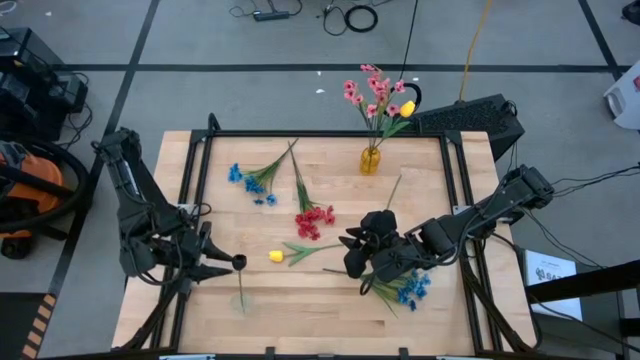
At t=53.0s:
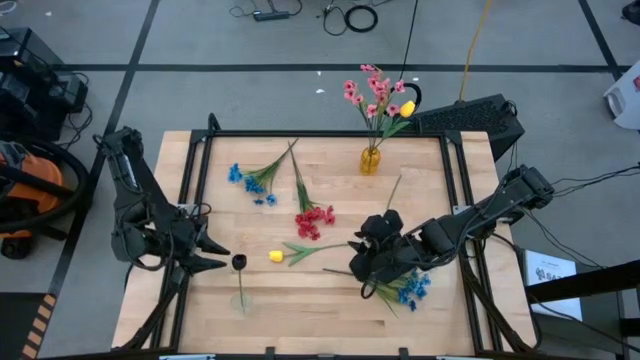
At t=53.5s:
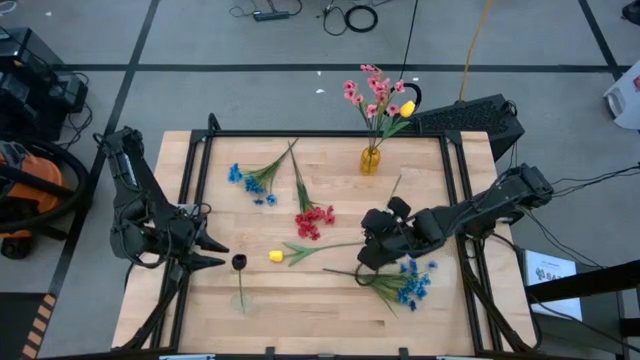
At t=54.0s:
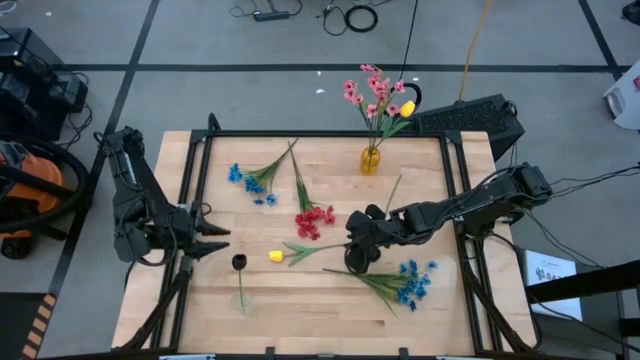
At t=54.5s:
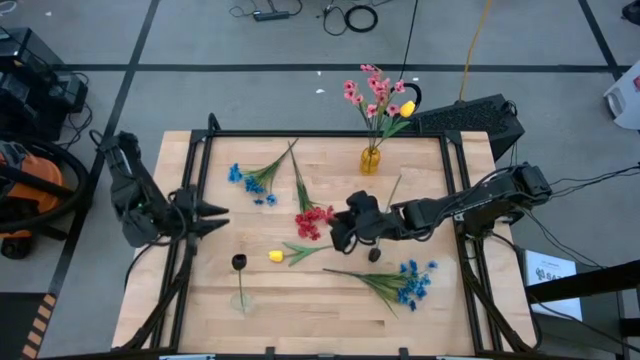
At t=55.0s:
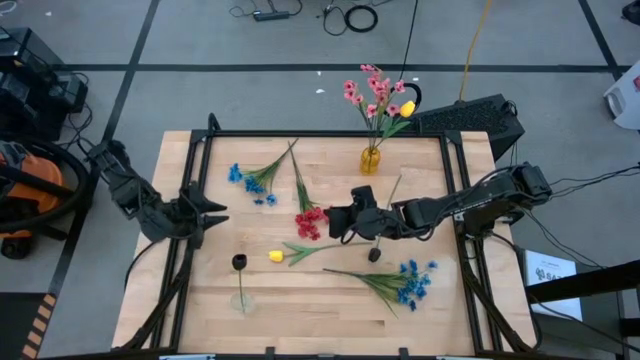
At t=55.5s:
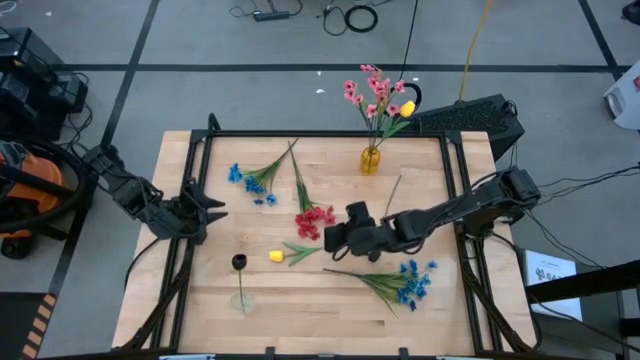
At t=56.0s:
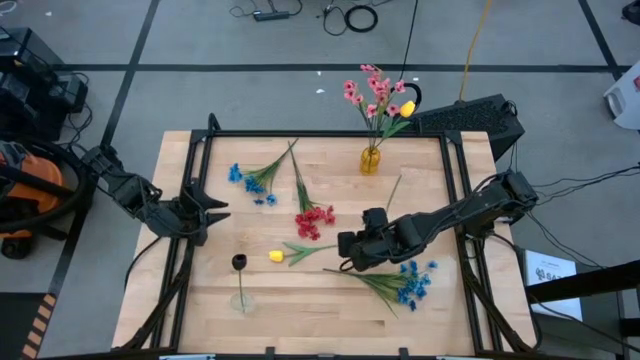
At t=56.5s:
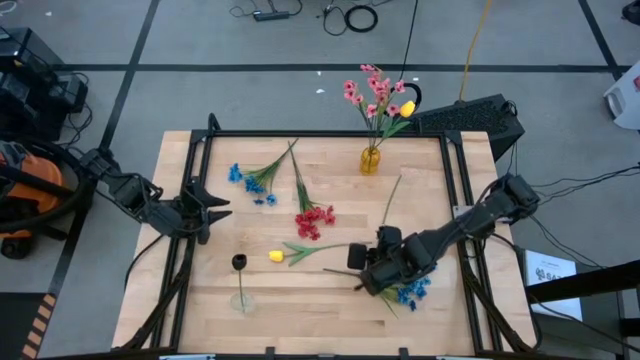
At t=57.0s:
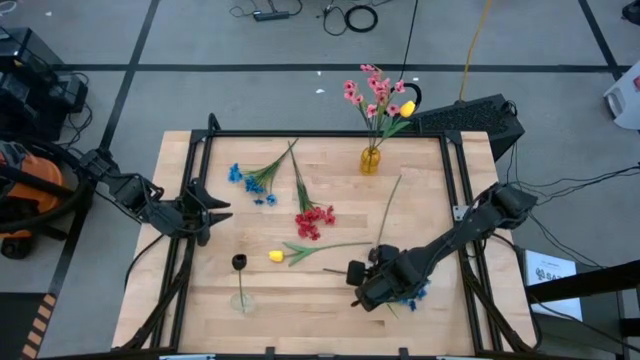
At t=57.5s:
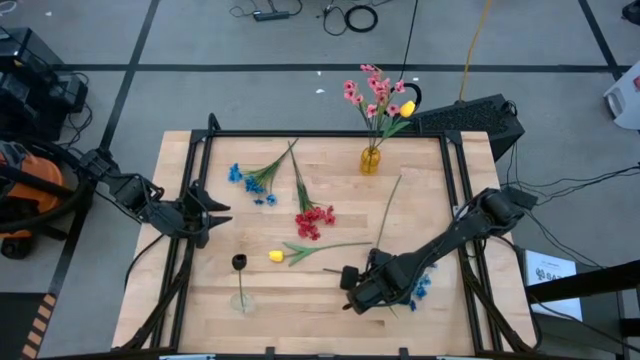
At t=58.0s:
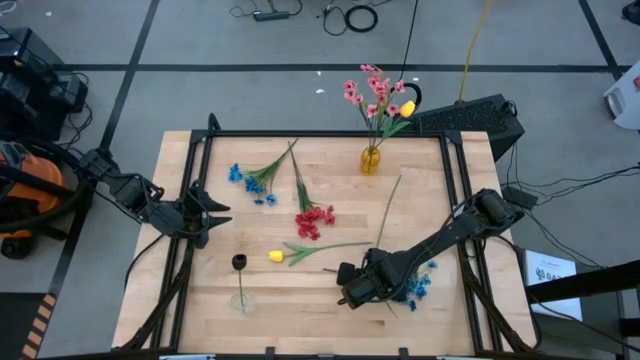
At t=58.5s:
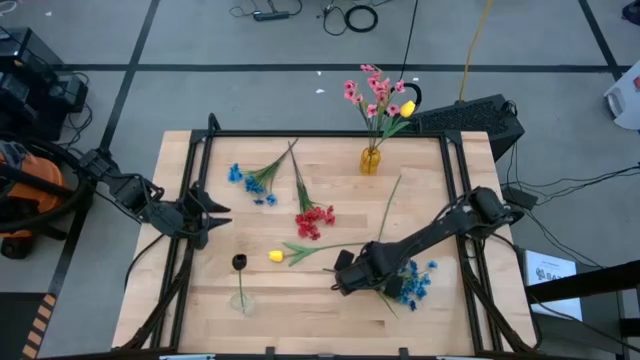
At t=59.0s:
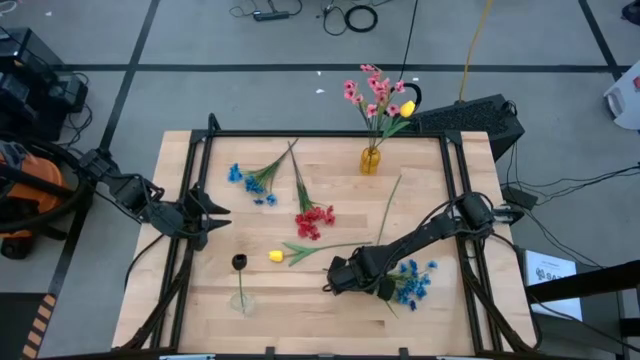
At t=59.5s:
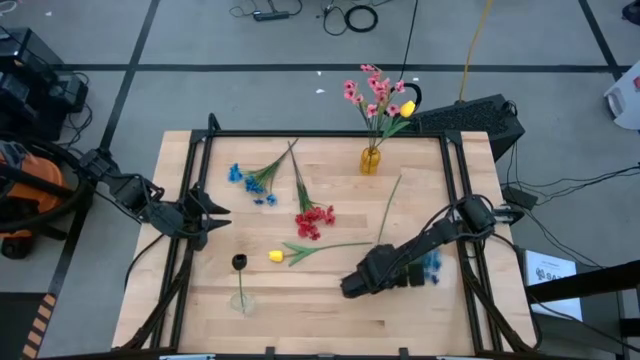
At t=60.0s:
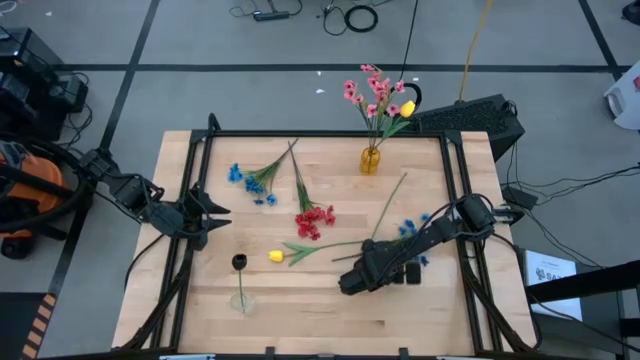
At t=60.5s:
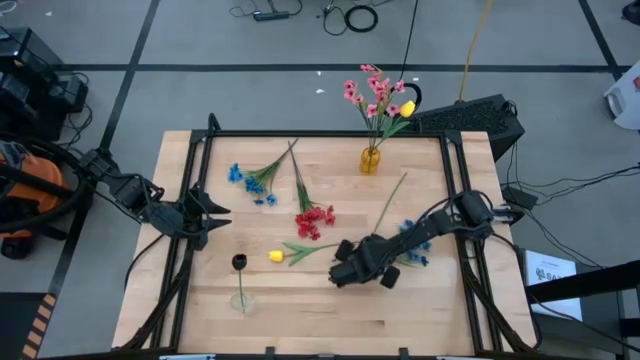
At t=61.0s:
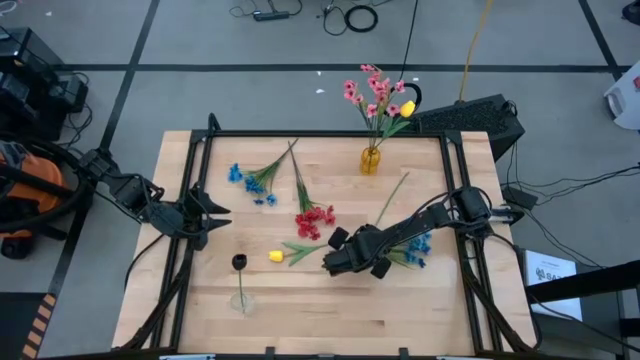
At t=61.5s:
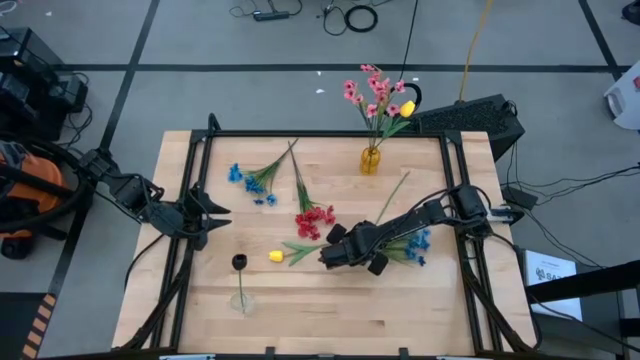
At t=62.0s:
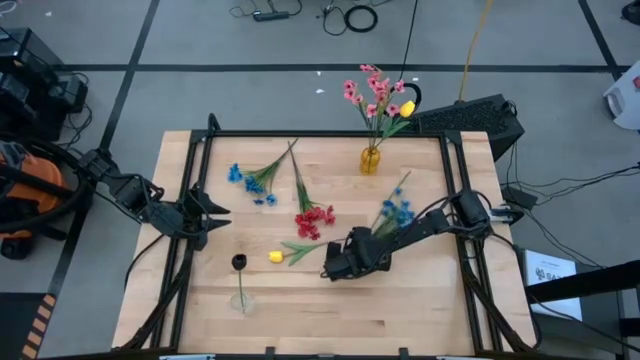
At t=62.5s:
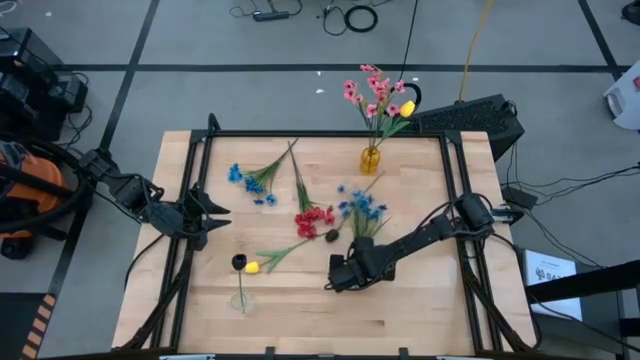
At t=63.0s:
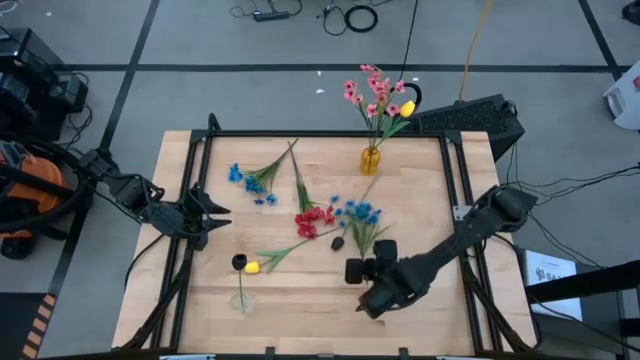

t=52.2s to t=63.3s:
Task: Sort flowers into vase by color
Put the bottom blue flowers into the transparent vase

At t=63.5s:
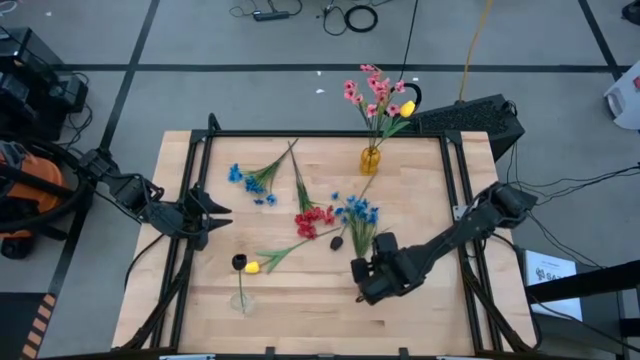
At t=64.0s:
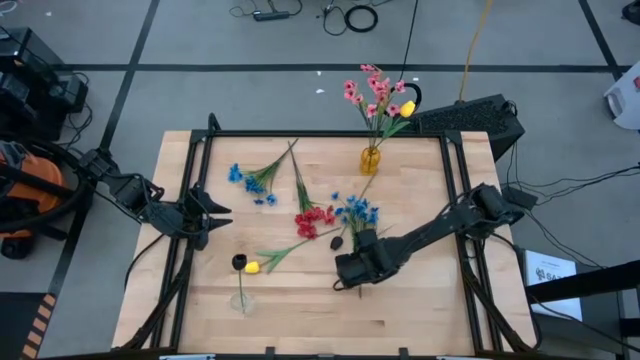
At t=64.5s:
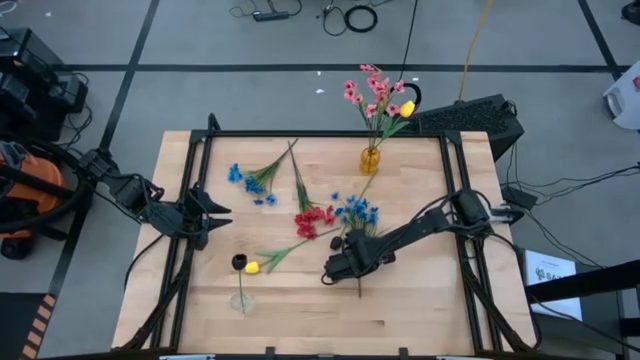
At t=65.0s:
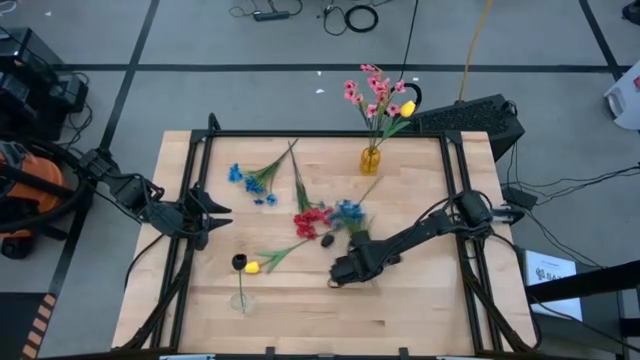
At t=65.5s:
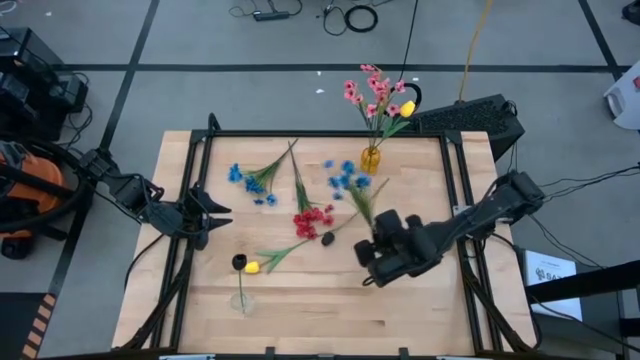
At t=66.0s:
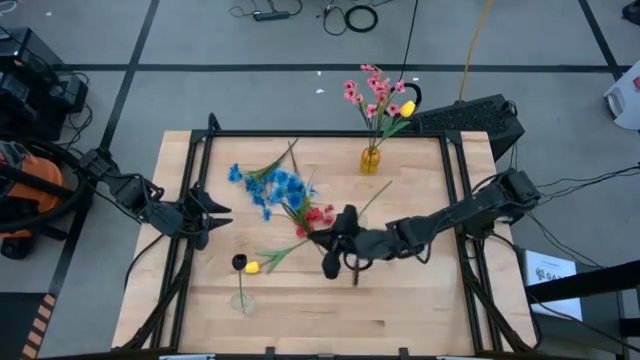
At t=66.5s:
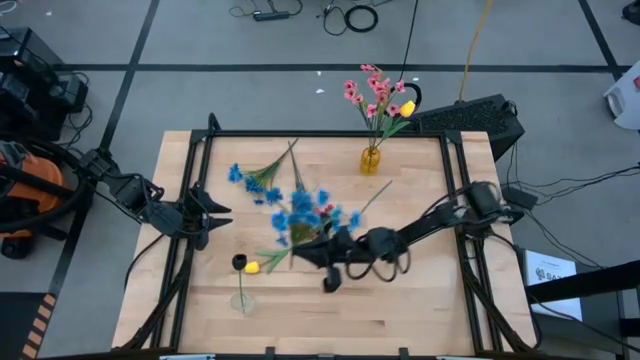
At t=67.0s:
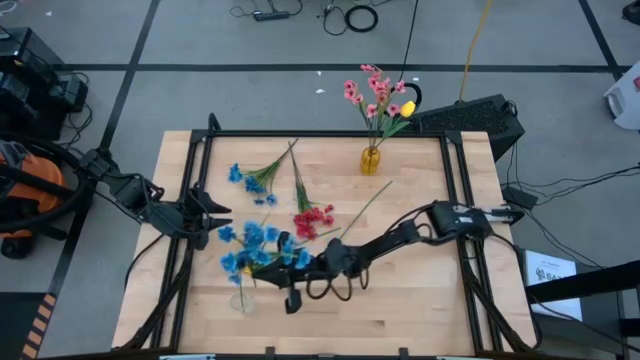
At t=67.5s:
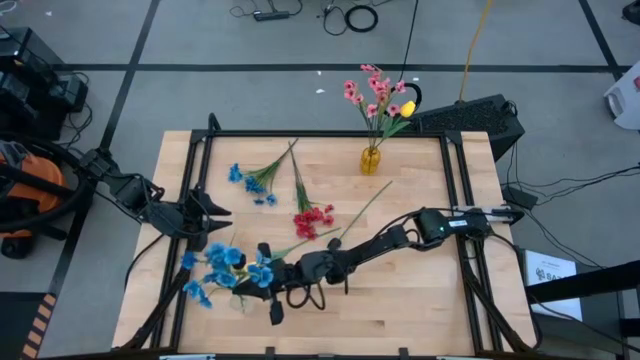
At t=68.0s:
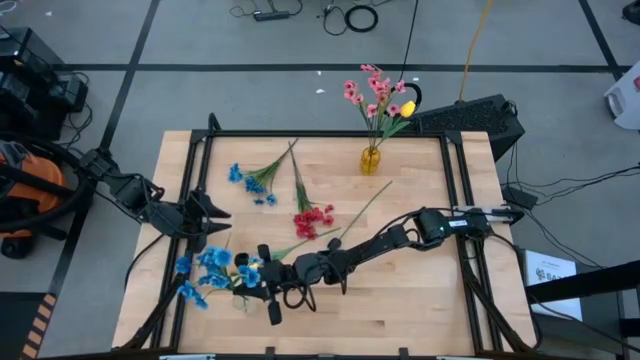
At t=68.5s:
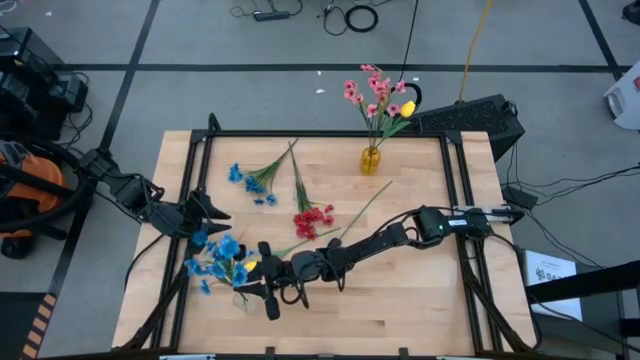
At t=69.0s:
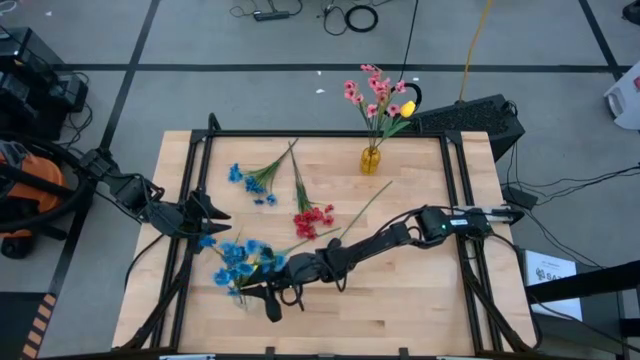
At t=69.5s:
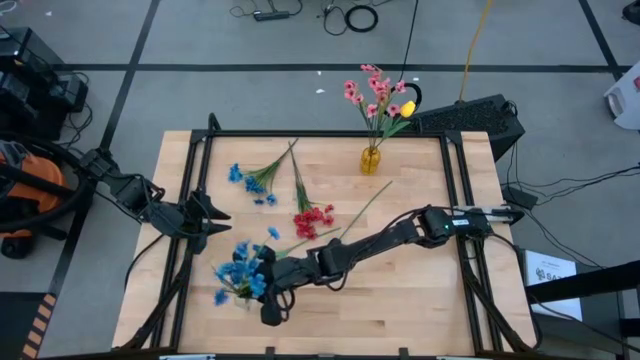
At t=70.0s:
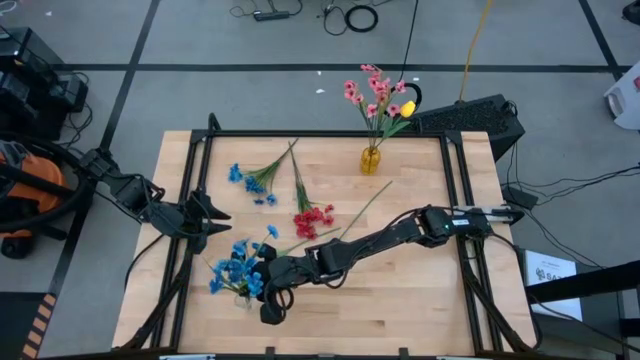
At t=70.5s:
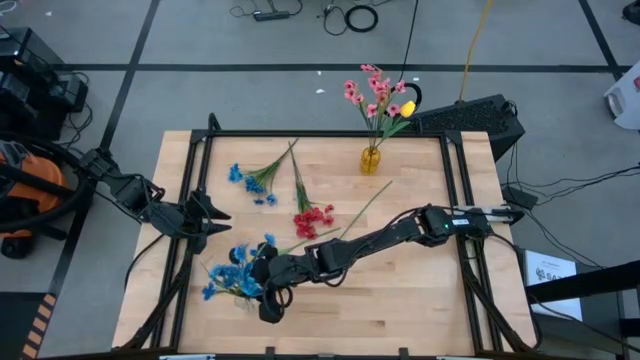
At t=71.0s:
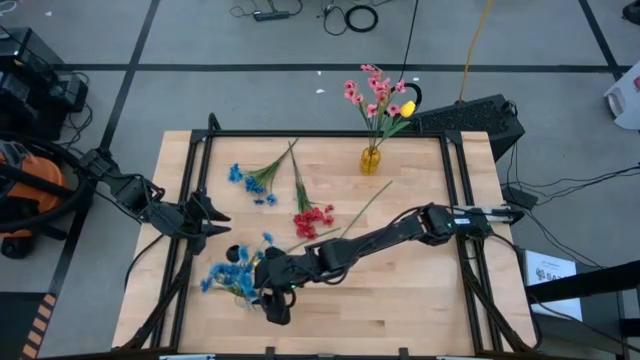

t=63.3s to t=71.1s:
Put the bottom blue flowers into the transparent vase

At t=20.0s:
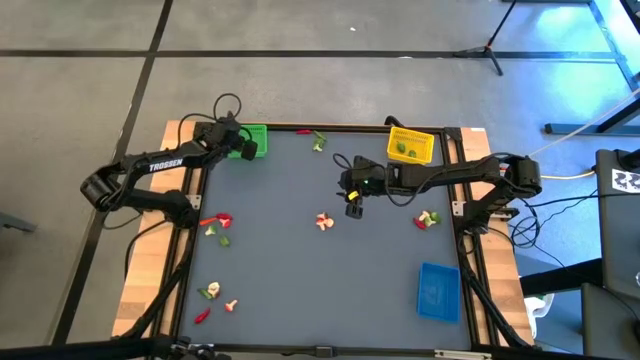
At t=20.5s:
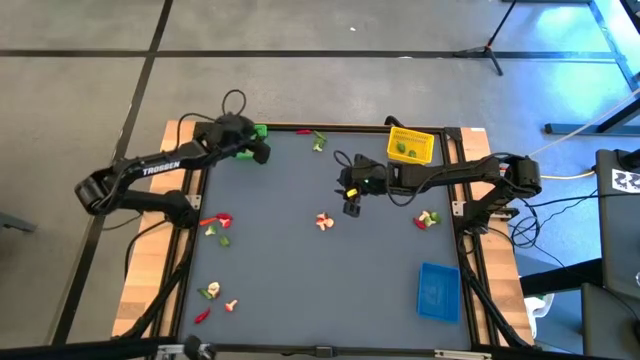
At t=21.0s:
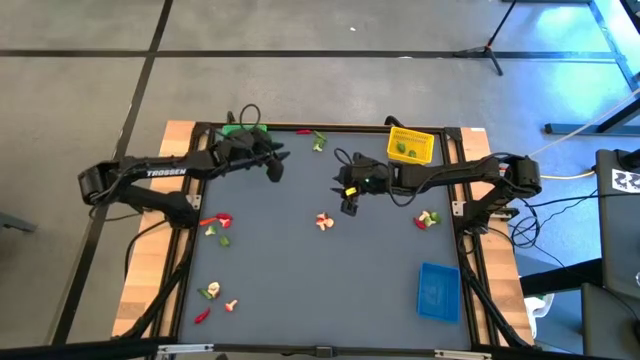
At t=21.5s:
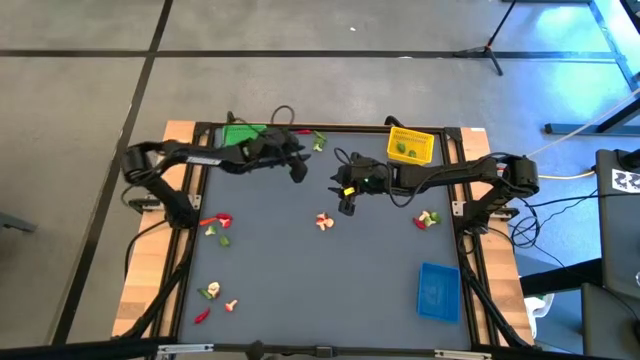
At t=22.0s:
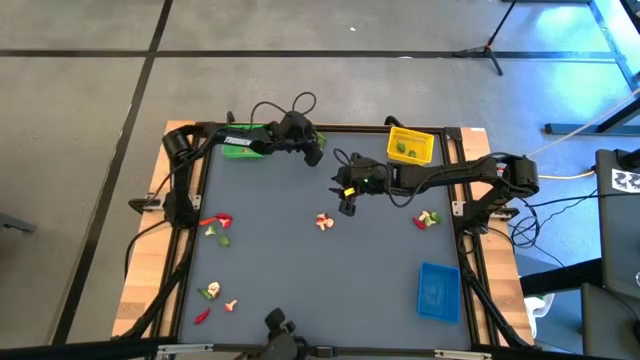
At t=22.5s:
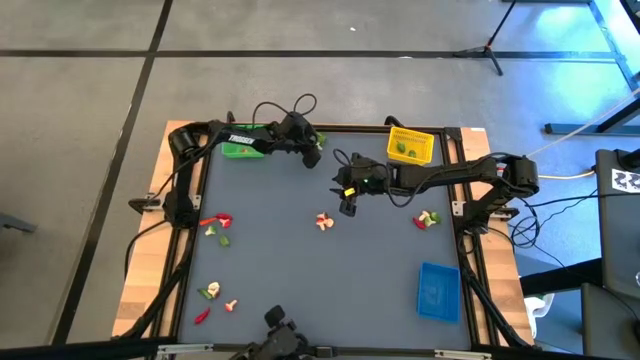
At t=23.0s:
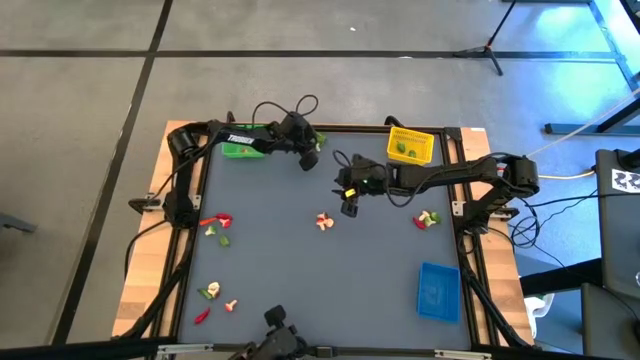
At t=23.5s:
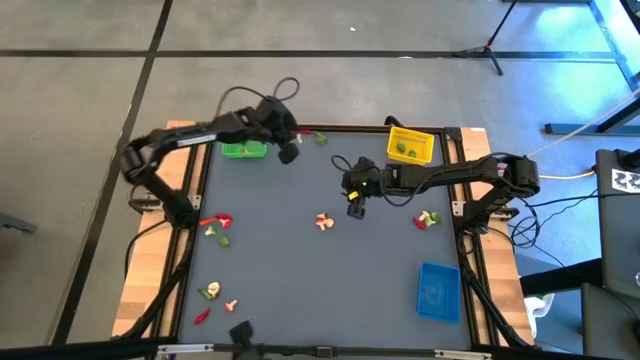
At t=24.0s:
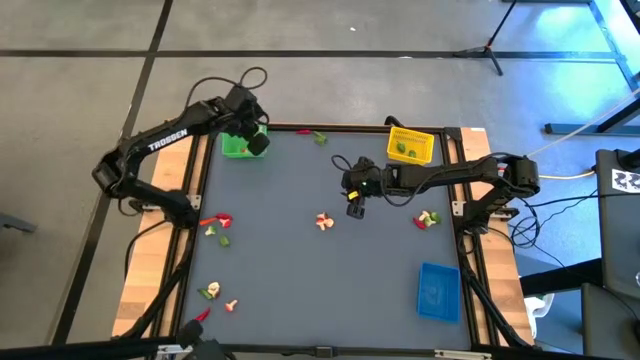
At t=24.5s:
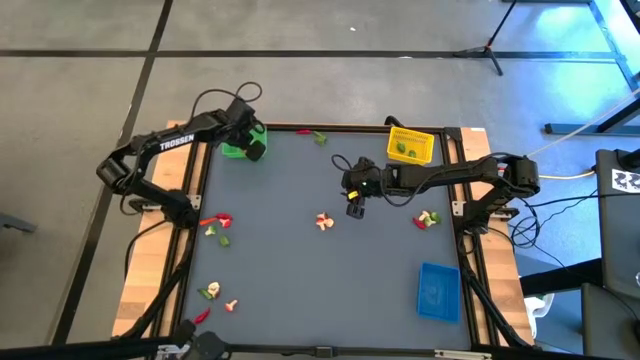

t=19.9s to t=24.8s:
Task: Sort produce into baskets
Put the green mushroom into the green bin
